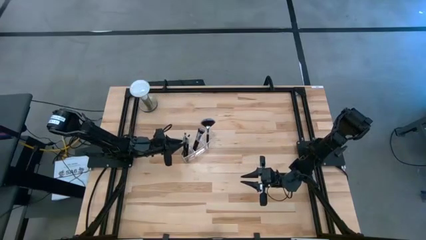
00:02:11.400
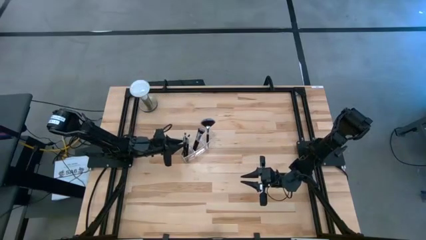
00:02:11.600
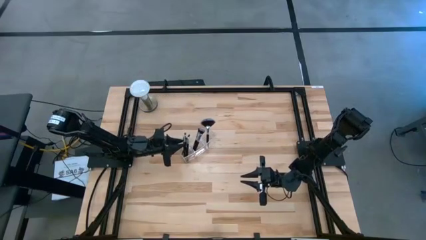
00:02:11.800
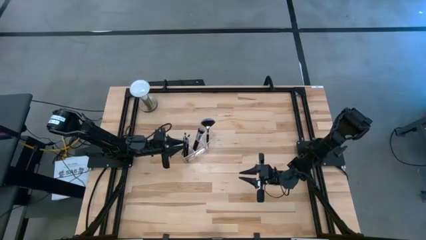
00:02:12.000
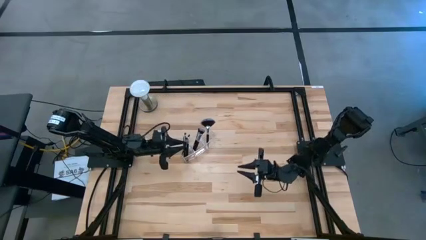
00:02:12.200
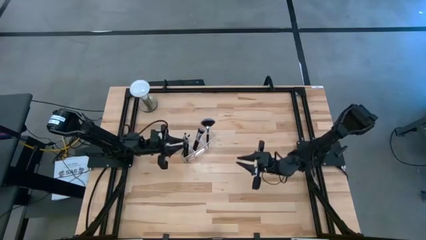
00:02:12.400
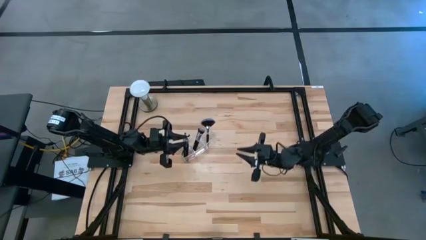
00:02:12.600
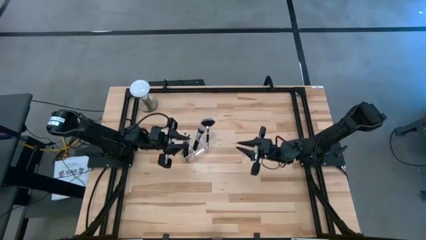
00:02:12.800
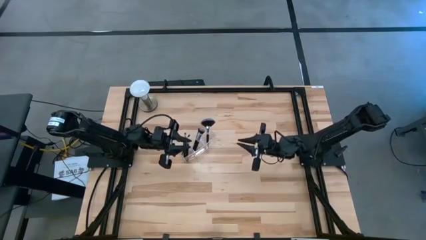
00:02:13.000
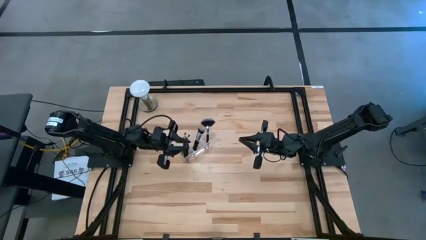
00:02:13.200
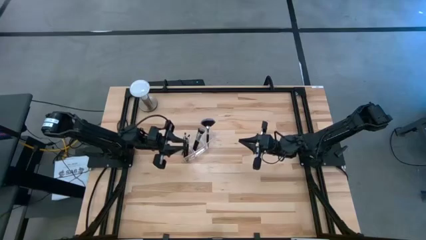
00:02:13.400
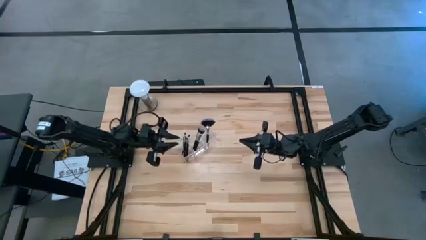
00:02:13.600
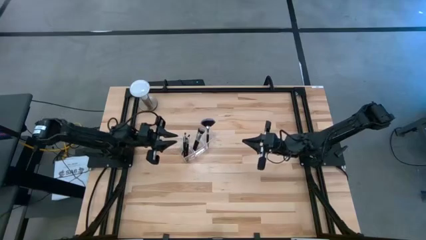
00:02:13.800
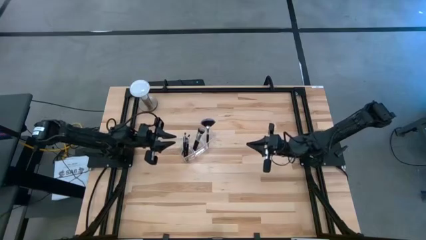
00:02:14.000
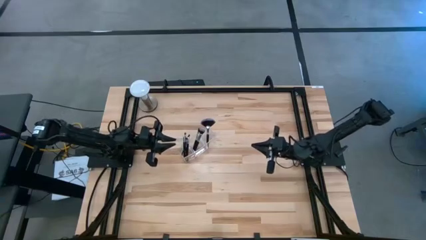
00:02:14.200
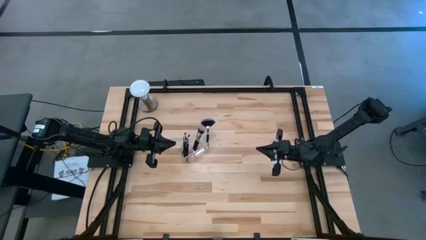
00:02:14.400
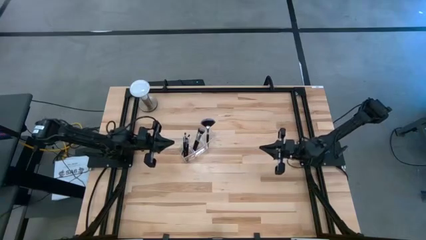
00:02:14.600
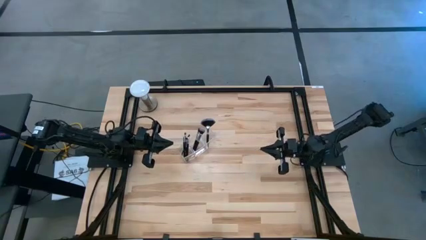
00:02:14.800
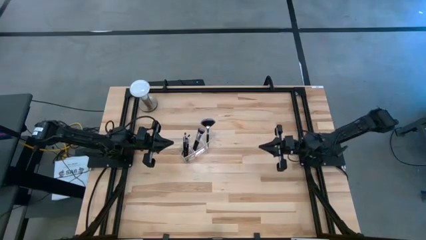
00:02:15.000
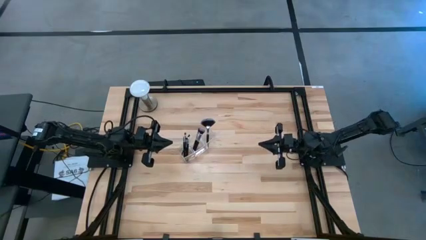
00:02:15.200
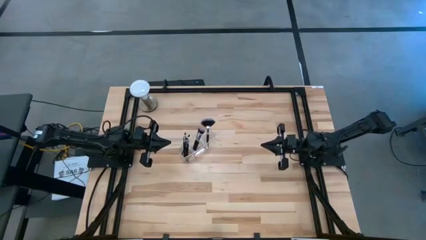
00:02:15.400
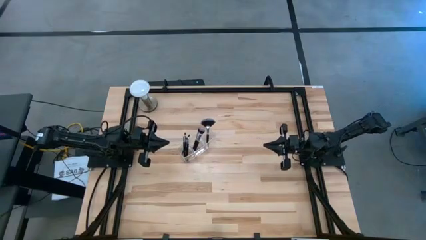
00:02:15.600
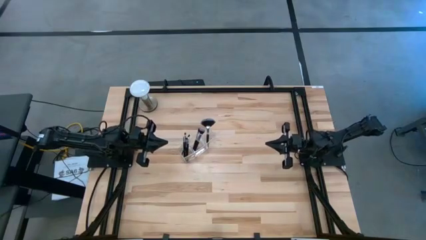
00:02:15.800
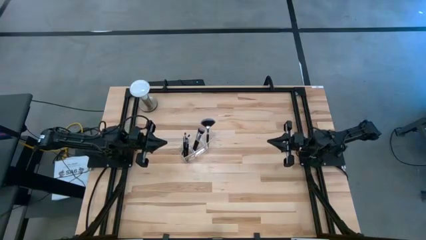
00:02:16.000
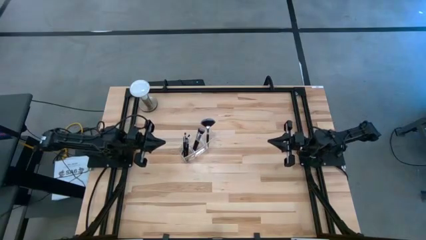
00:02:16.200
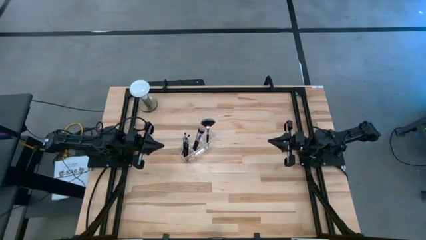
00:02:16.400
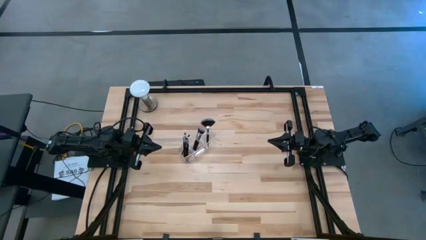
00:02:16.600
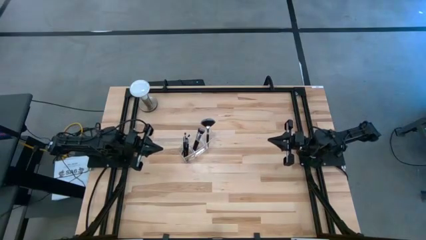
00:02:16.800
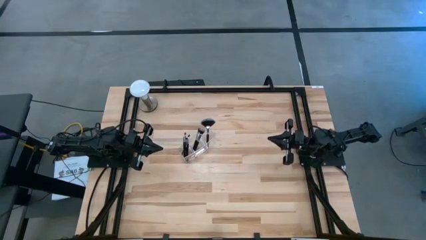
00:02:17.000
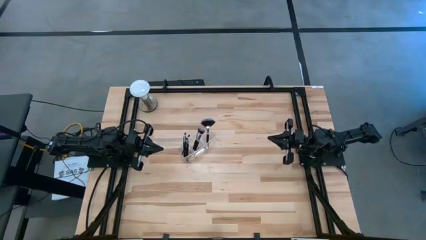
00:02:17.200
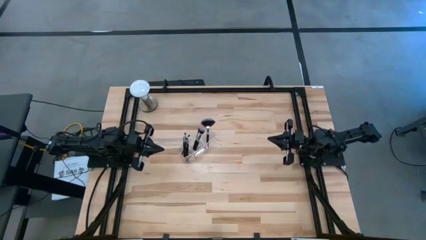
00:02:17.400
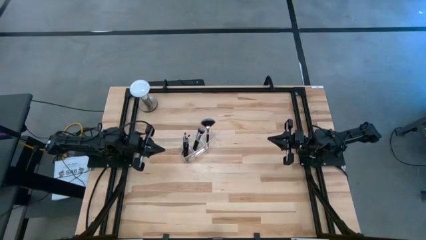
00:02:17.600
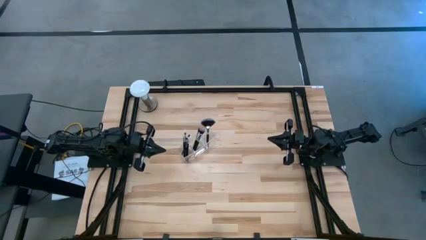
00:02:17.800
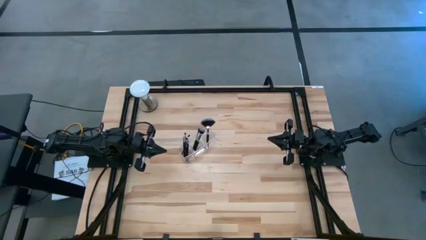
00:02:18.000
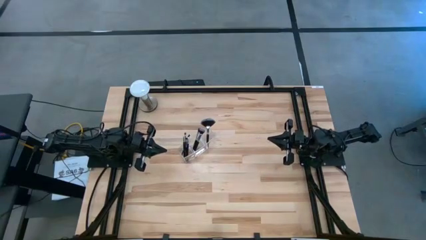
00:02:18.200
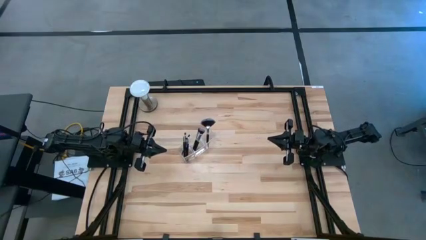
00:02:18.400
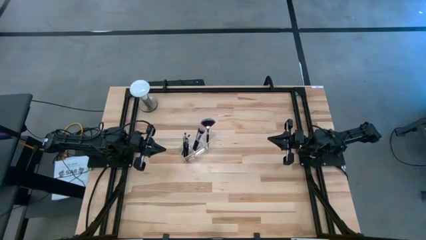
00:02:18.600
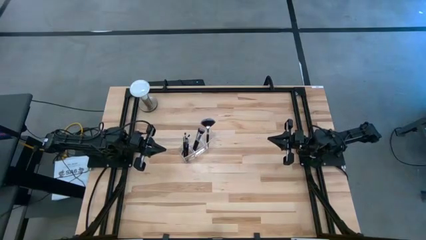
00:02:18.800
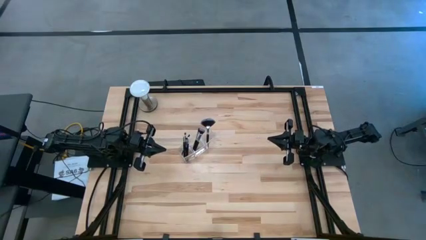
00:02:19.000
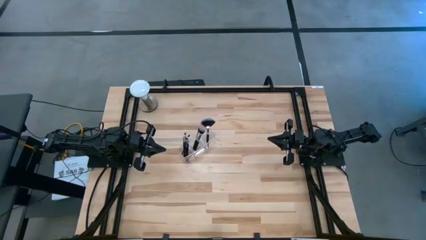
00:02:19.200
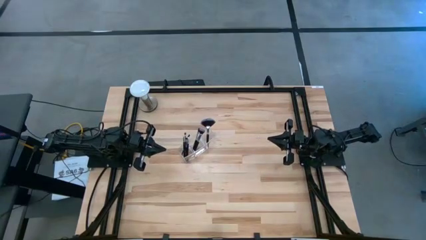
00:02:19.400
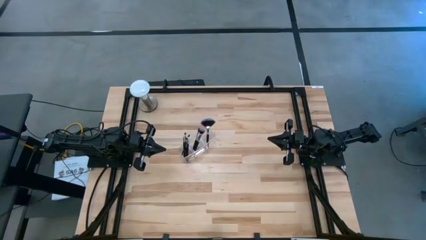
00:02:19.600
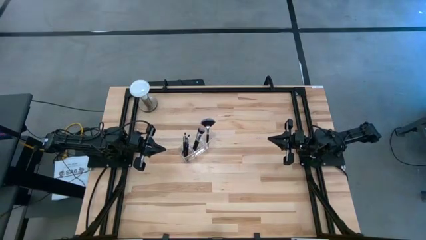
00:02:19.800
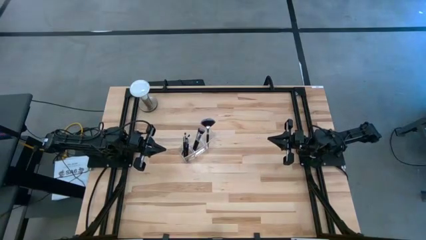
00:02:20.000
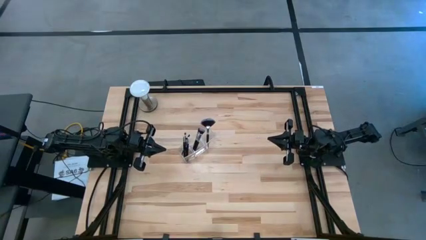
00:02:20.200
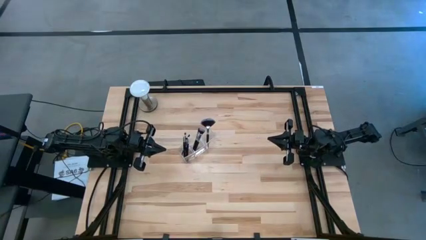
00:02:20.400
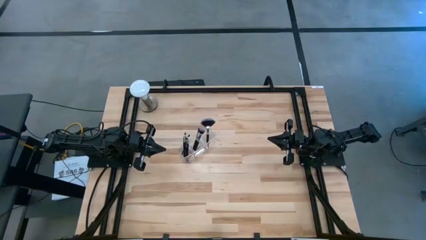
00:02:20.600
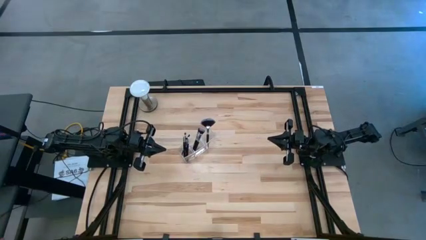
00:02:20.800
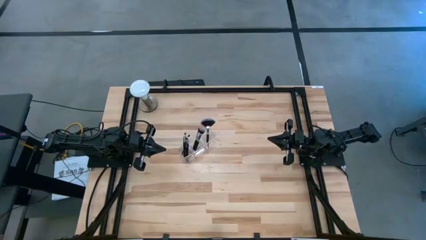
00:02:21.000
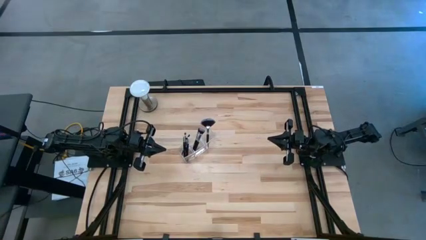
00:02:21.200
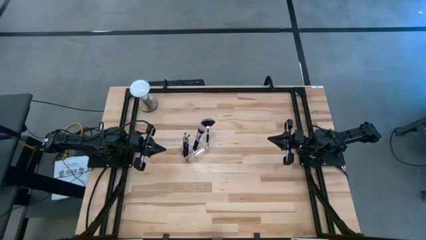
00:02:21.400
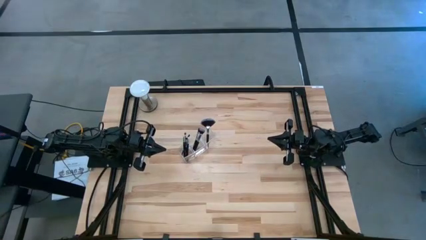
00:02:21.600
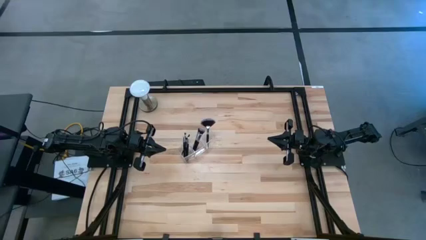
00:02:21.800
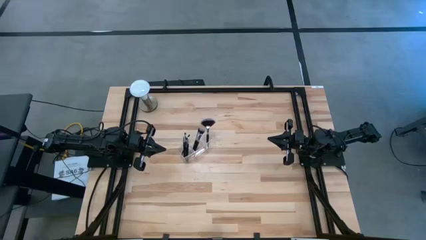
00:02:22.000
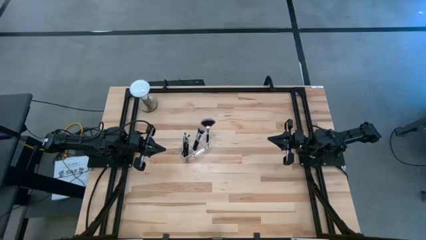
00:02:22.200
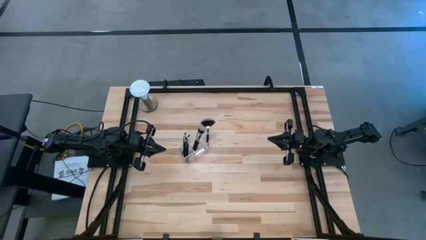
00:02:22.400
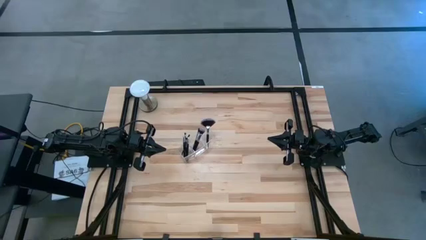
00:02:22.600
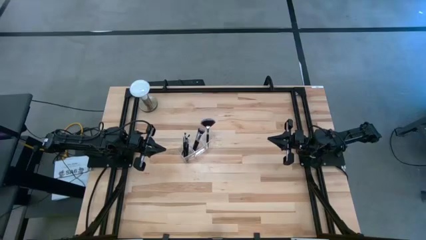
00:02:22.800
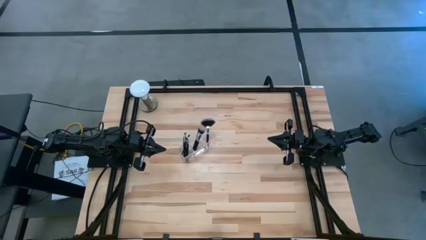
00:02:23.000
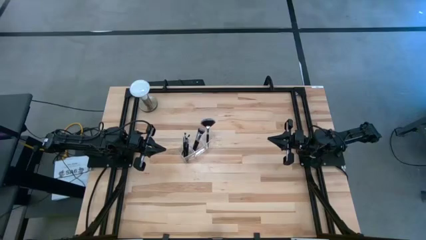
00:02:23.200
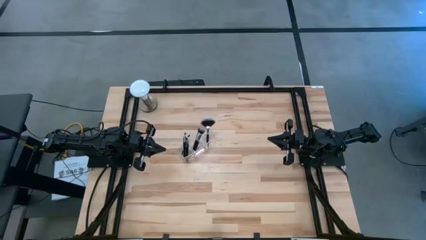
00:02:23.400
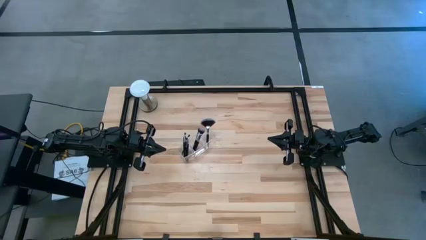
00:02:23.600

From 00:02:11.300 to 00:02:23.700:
Task: Put items in baskets/containers
Return to Home Position

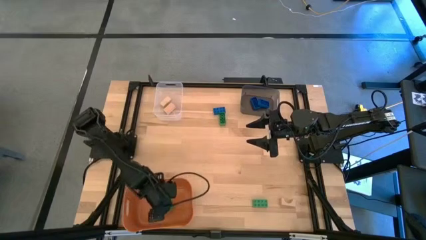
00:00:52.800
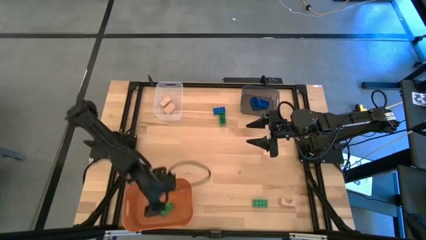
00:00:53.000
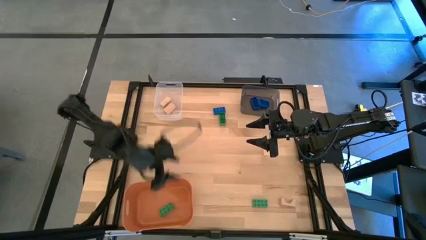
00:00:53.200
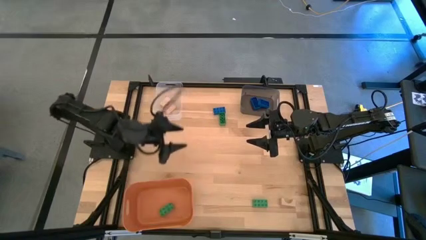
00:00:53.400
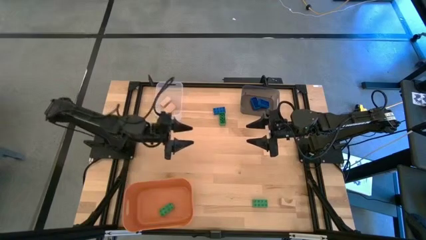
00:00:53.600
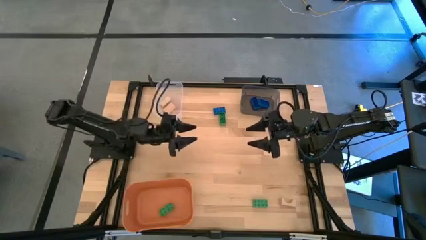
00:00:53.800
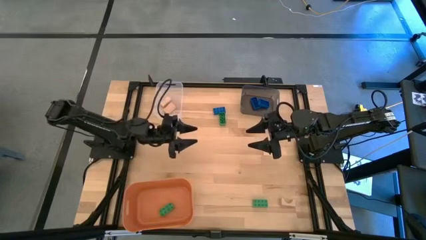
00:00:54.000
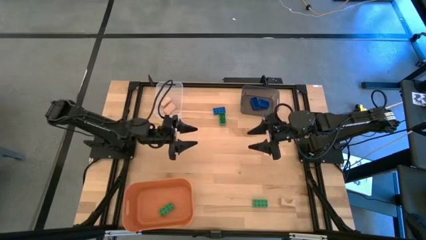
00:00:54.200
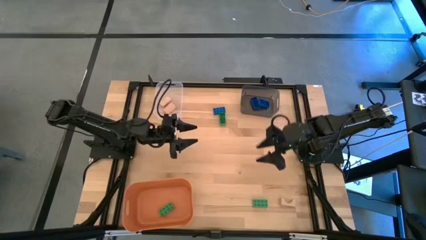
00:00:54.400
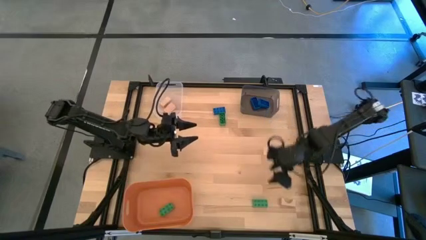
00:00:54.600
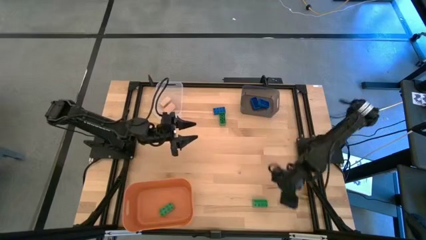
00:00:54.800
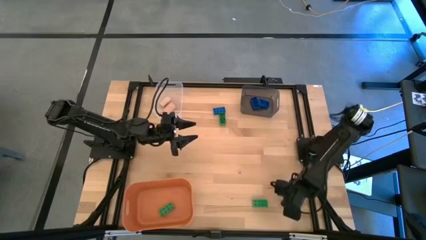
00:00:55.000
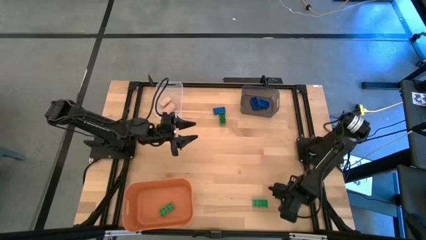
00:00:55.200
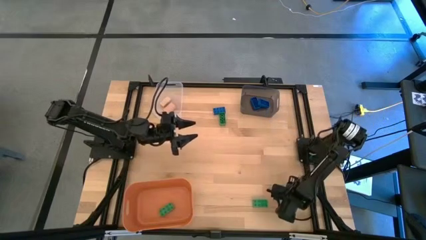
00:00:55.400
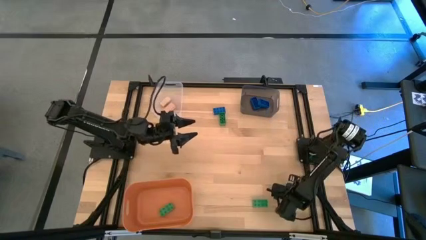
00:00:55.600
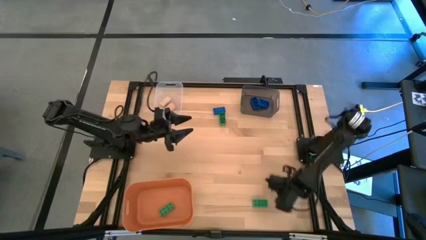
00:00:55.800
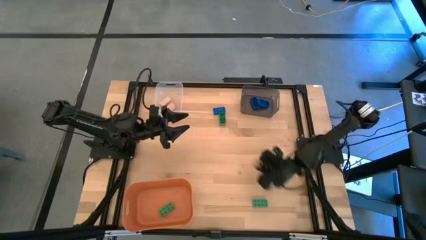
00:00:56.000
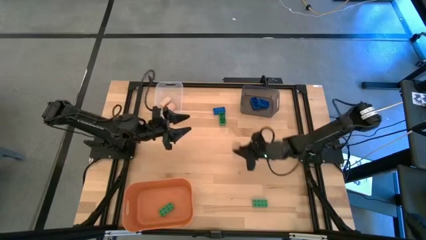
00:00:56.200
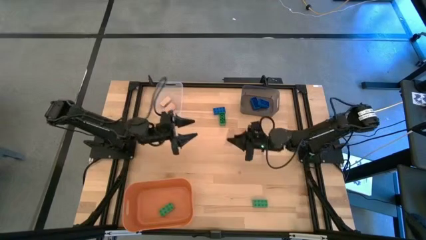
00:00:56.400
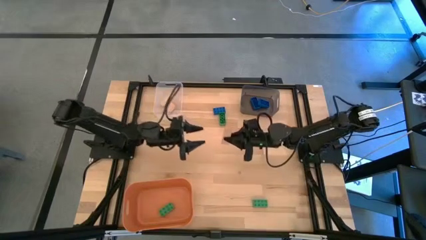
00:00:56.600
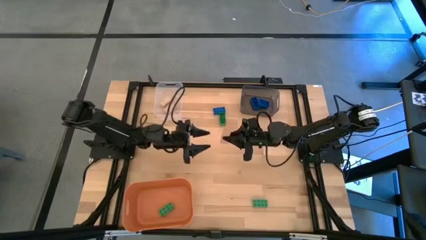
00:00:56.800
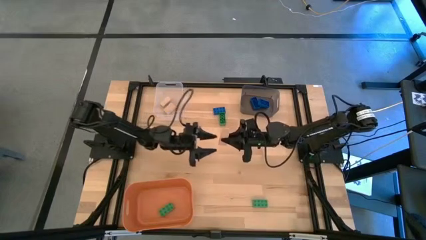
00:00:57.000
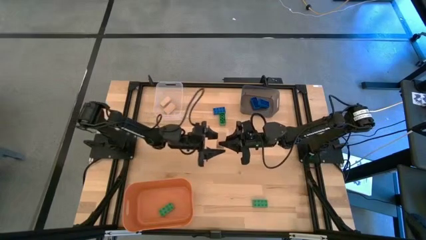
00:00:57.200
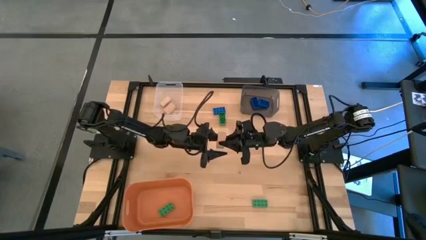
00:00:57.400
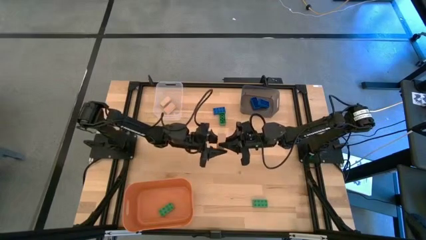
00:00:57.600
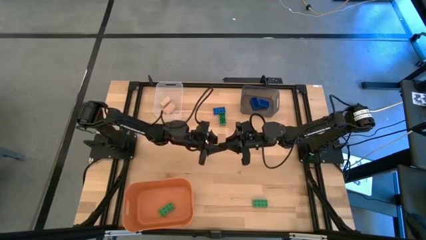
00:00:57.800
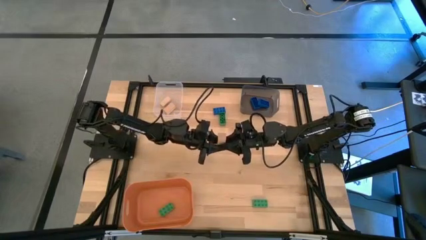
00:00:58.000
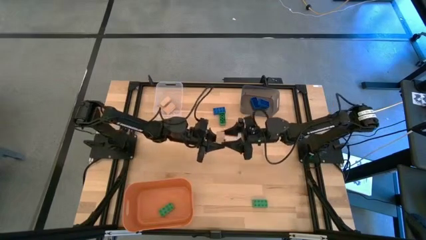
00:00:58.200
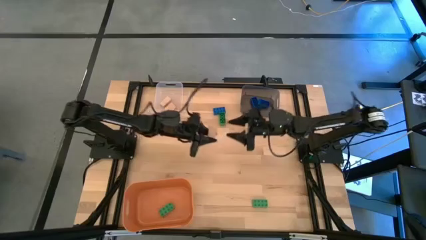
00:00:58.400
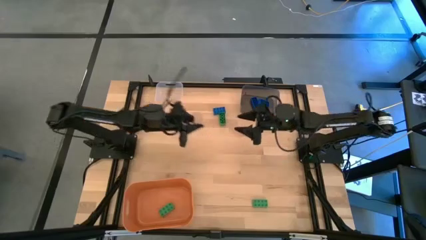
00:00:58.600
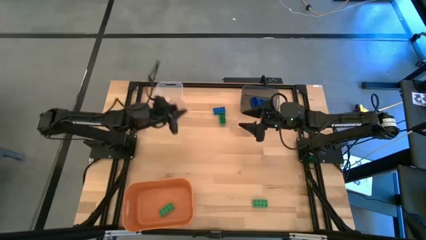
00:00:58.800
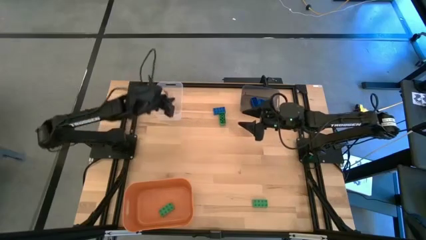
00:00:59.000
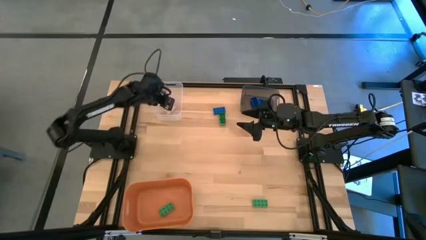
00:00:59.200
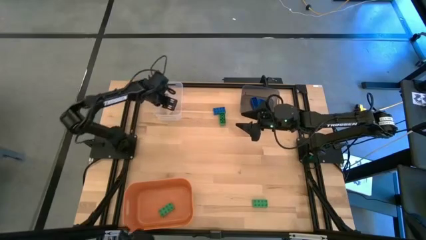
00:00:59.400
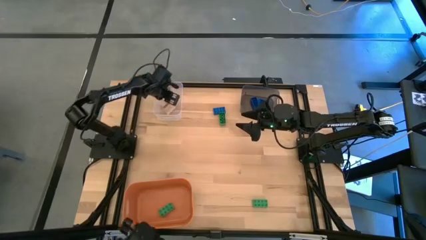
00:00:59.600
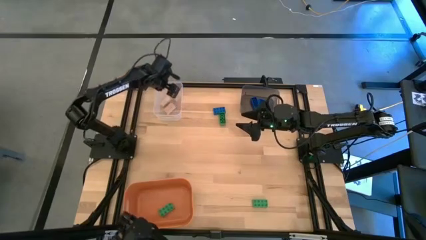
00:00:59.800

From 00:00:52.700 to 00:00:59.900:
Task: Sort & place blocks by color
Put the brown wooden block into the transparent bin
